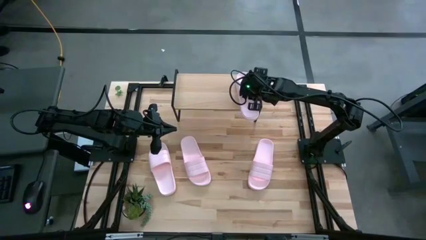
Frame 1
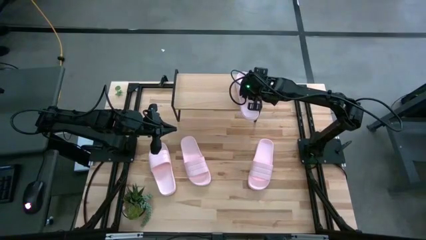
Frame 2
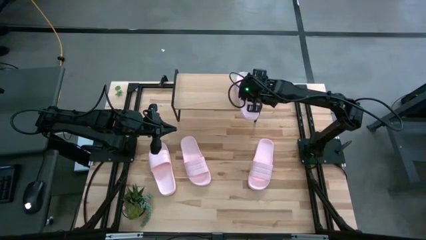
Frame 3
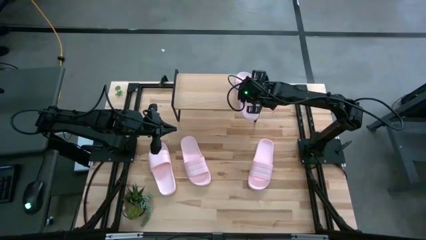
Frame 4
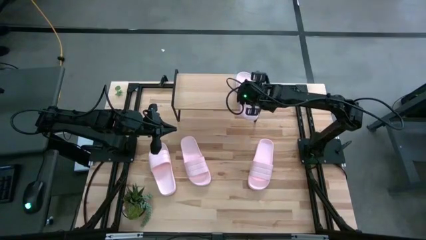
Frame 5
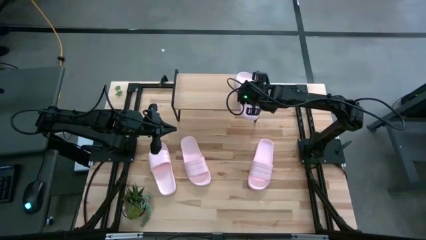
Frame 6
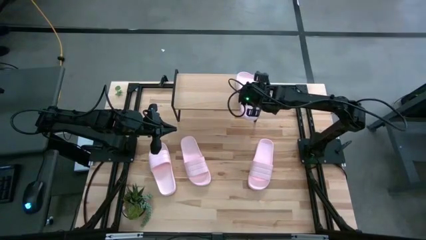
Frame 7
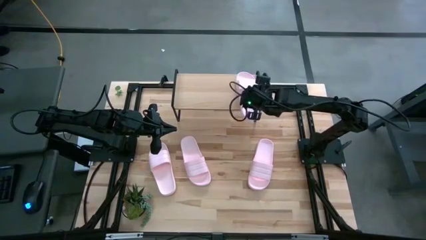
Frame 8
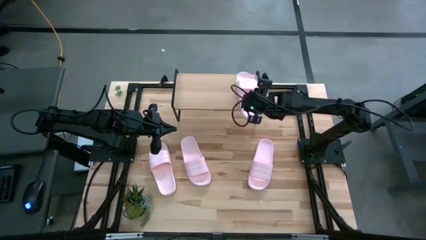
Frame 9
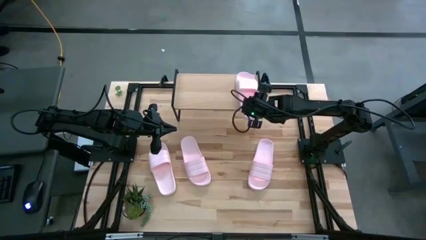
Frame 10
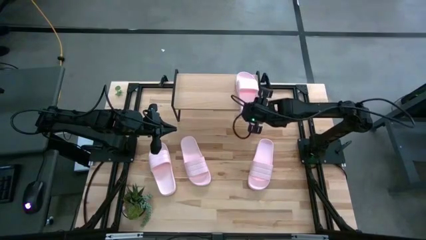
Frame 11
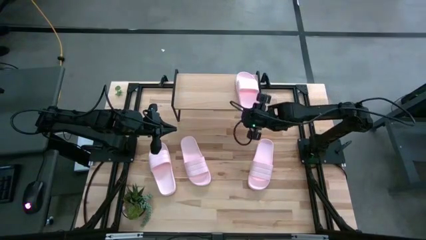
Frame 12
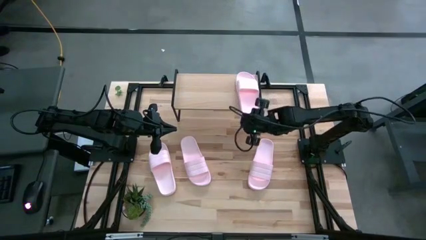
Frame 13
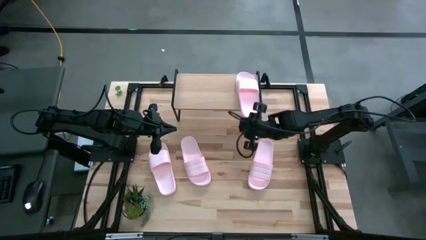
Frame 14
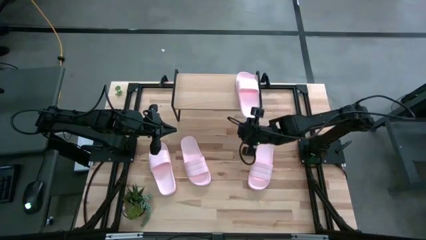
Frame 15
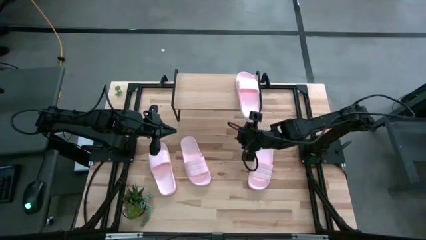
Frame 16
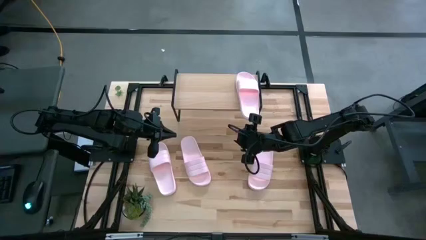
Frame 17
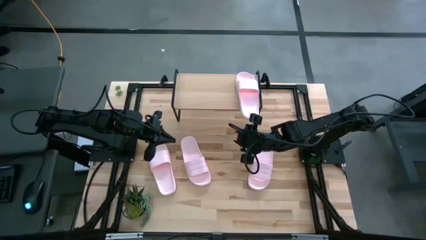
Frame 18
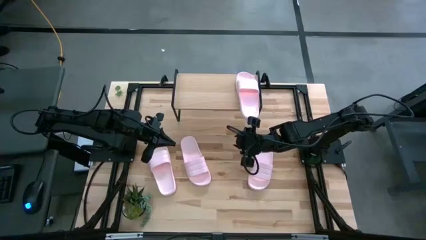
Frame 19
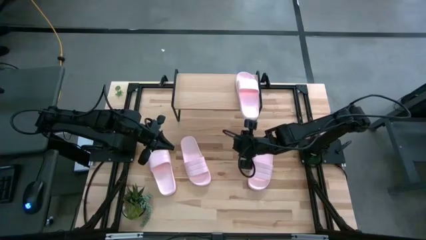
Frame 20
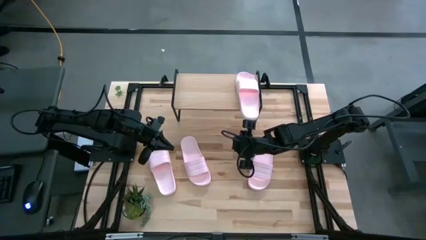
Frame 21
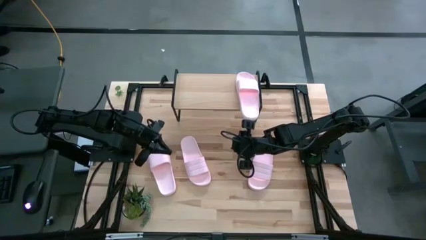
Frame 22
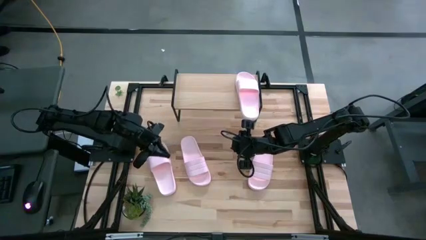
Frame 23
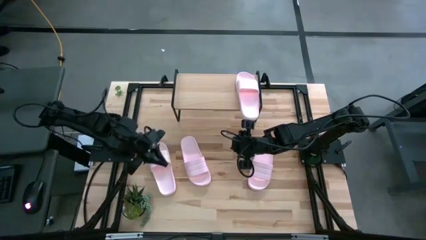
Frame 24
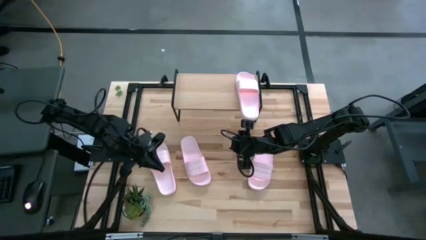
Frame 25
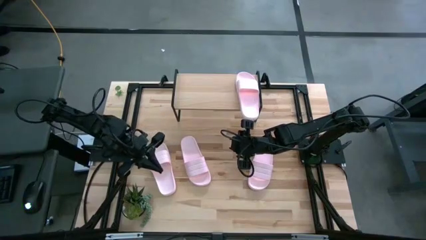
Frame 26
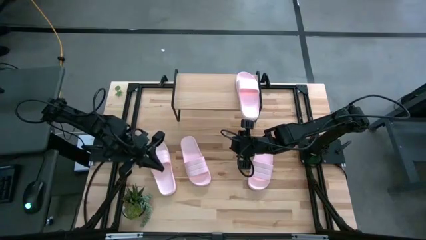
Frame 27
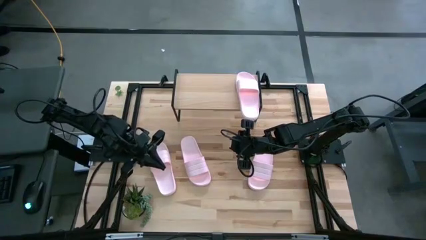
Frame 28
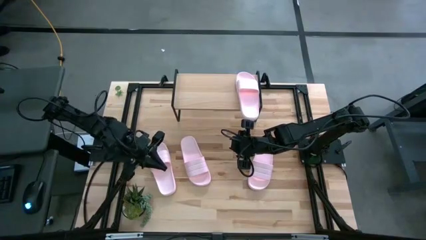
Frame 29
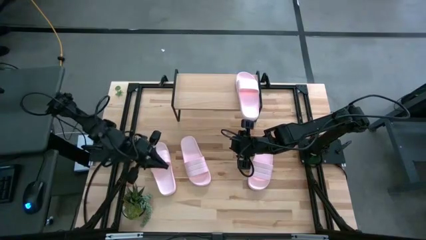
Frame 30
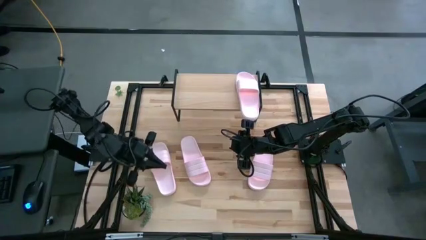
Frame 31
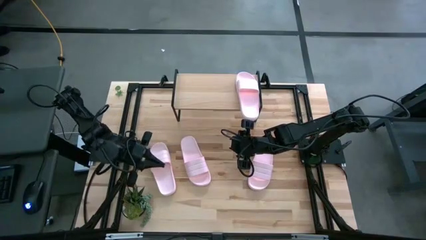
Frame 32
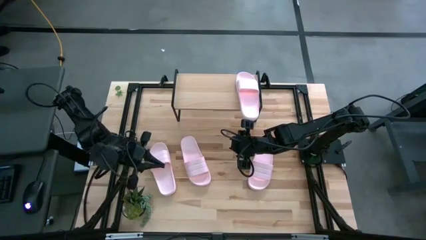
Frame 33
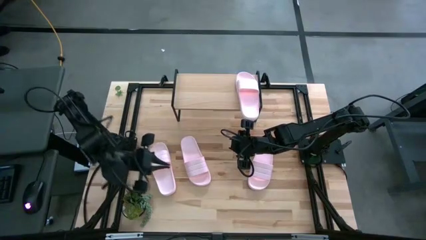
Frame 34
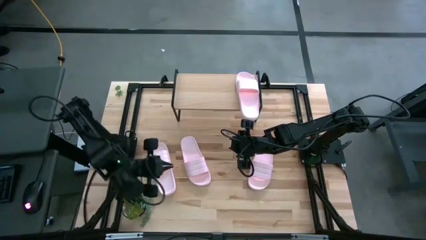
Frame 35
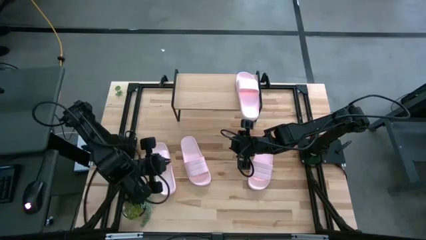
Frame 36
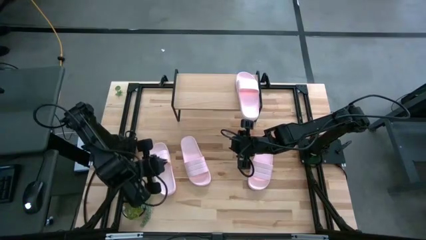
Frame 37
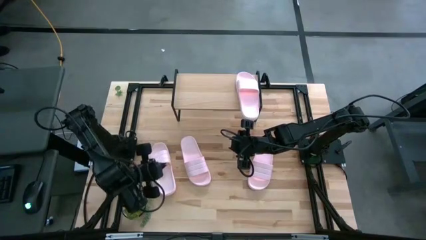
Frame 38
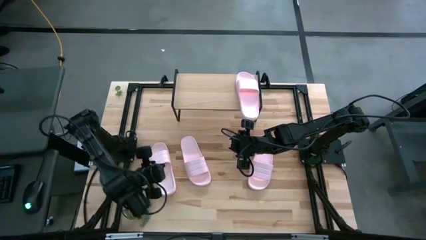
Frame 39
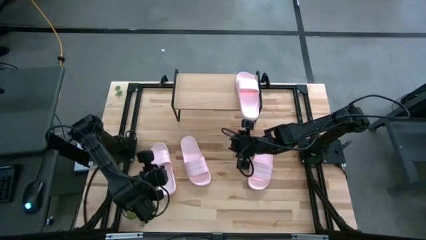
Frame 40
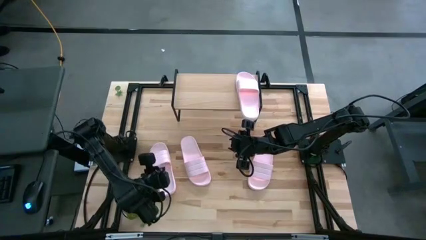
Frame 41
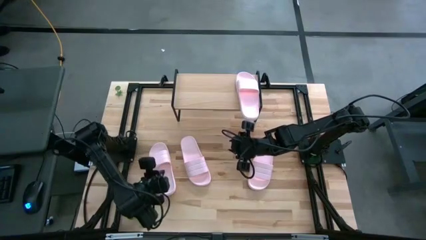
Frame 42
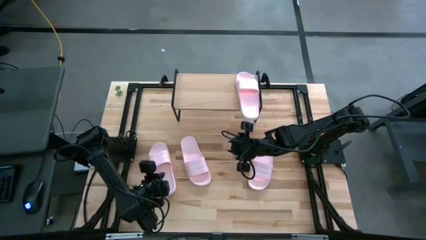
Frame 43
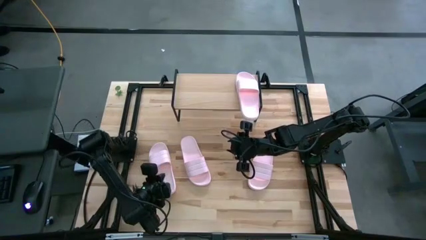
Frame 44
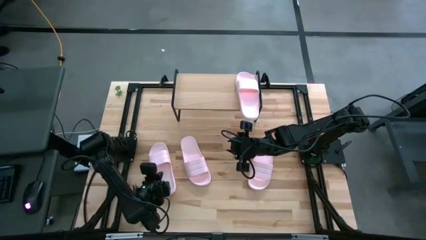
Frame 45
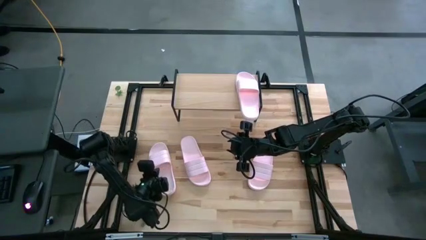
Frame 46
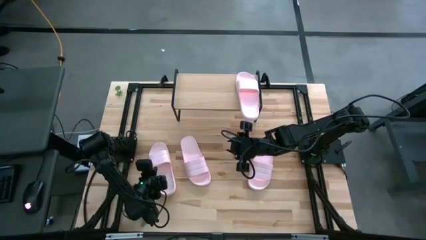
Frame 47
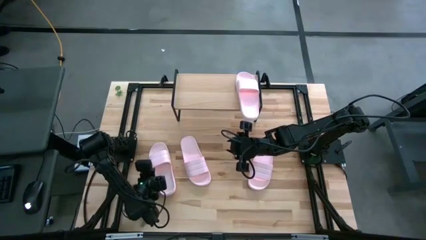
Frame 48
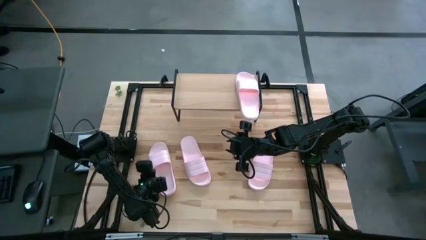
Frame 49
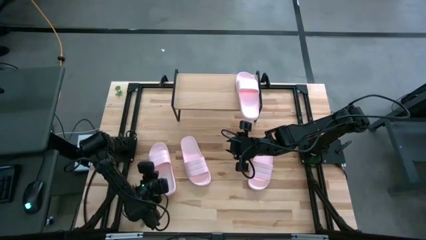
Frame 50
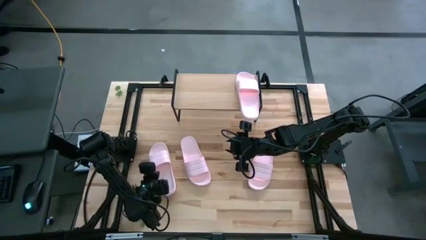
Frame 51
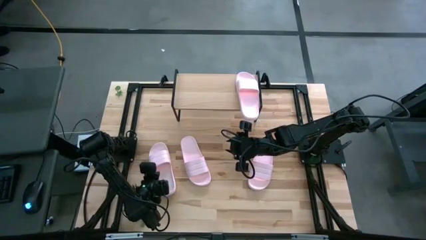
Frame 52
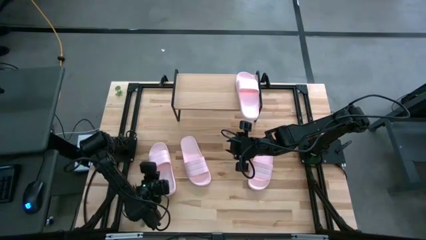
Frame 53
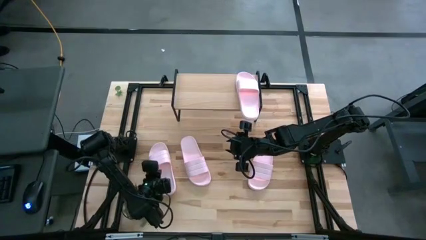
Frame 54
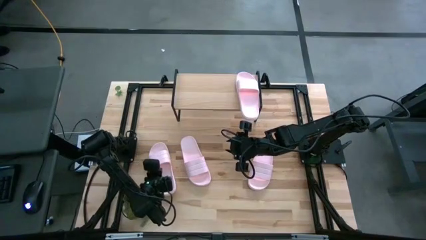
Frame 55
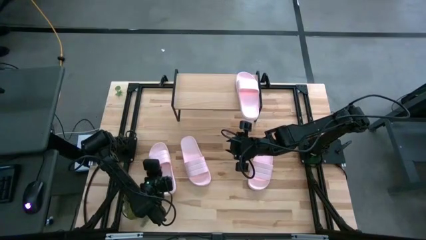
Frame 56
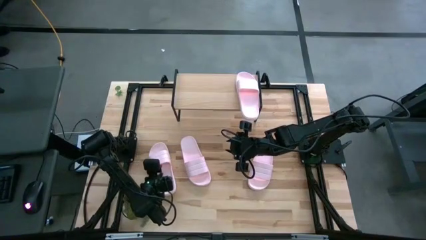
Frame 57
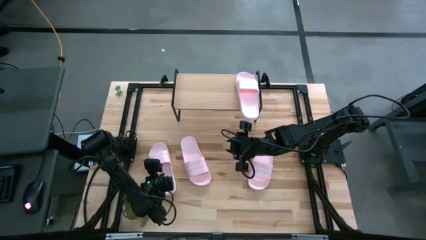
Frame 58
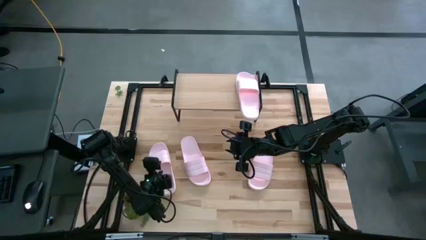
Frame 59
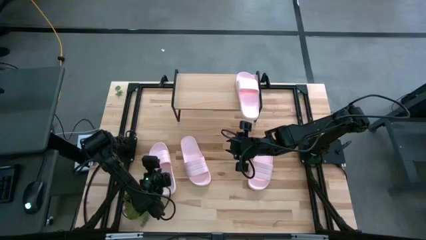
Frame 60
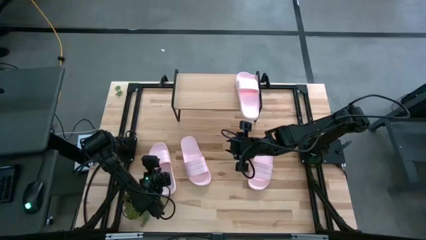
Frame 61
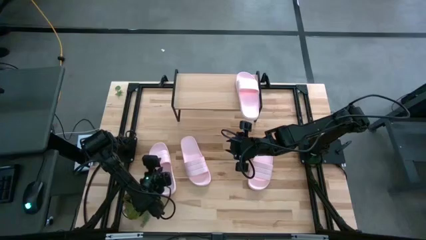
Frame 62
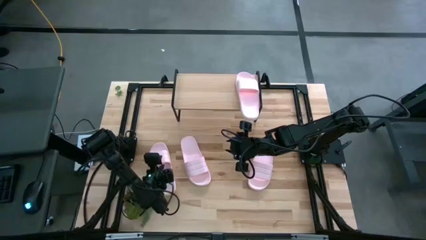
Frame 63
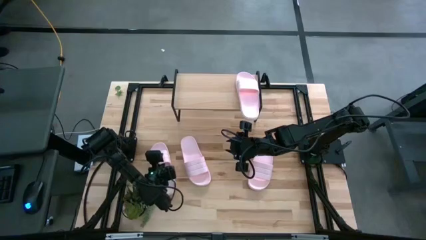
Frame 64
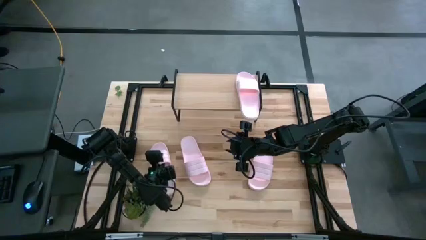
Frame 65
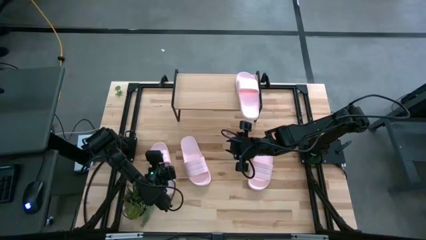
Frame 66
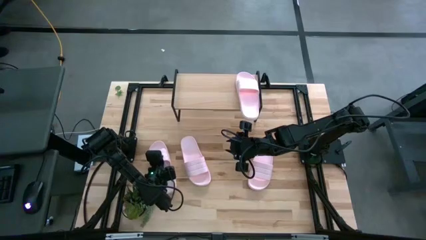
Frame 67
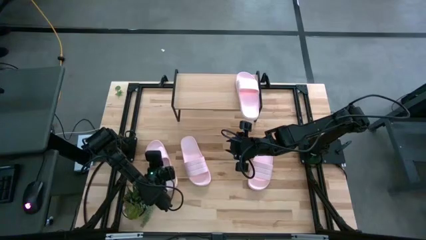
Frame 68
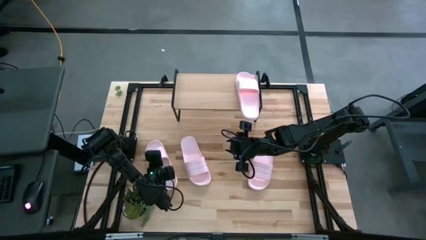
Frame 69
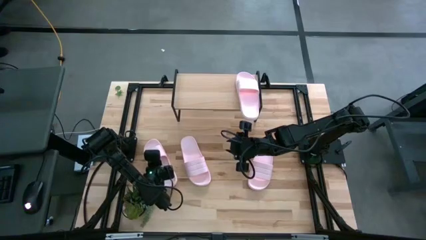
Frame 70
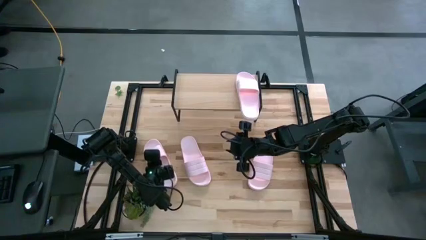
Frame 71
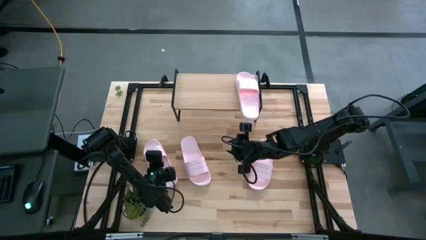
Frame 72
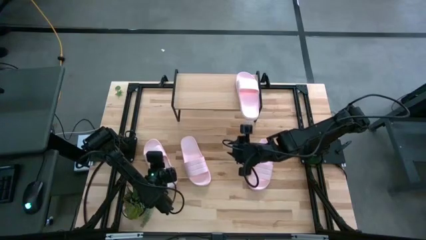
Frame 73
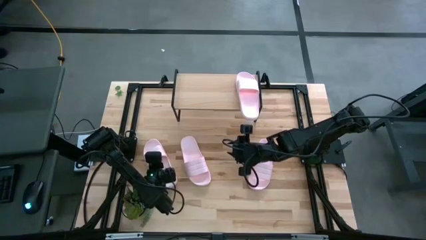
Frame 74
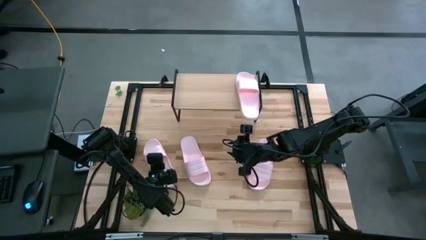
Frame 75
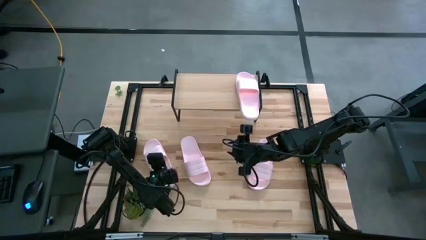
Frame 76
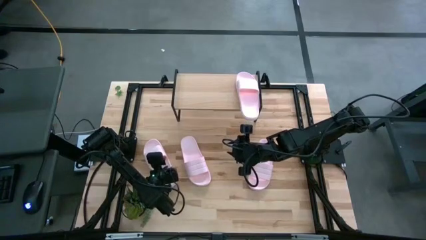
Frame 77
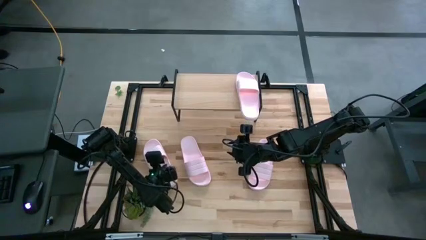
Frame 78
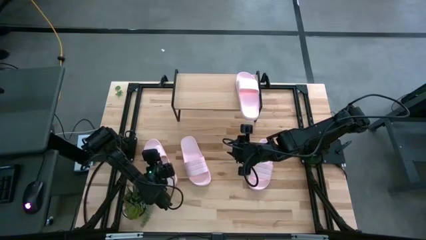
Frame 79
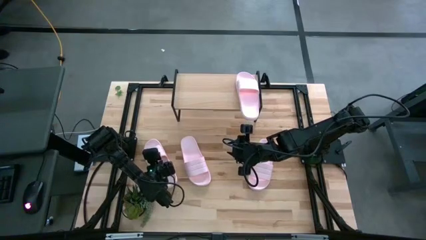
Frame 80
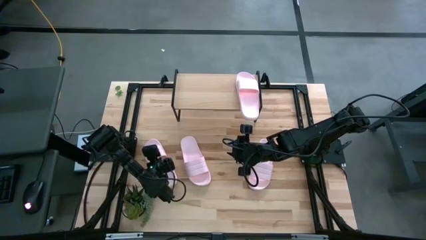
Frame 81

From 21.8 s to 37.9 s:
Task: Pick and place slides into the shelf
Put the white slide on the shelf
